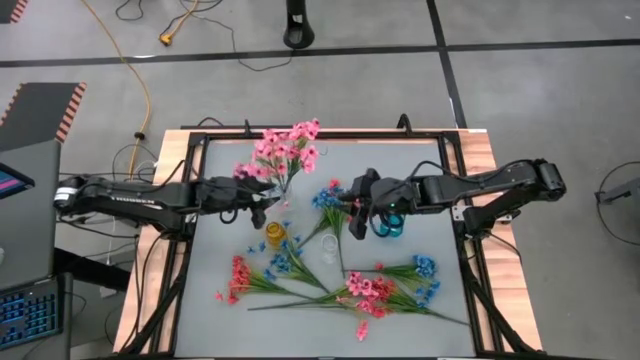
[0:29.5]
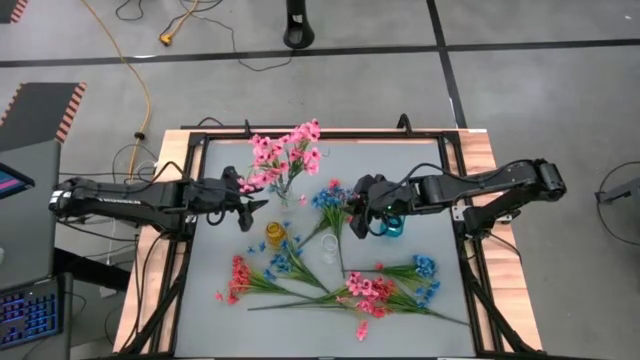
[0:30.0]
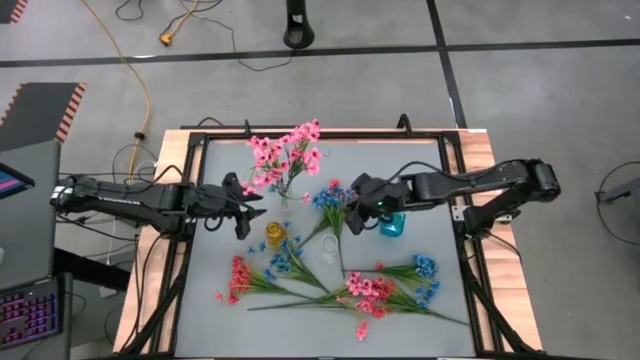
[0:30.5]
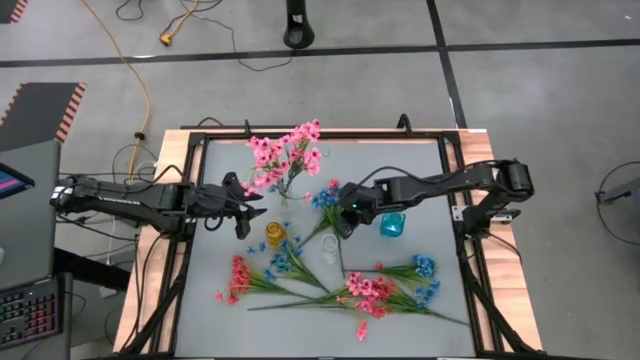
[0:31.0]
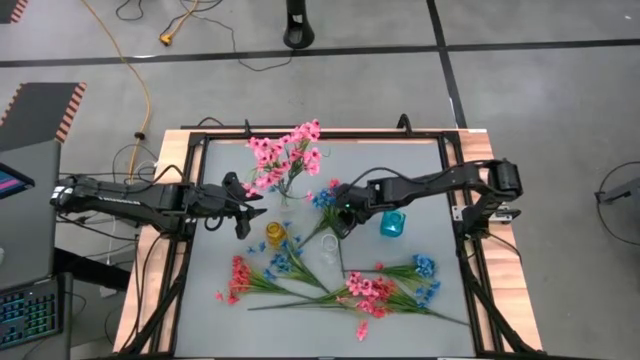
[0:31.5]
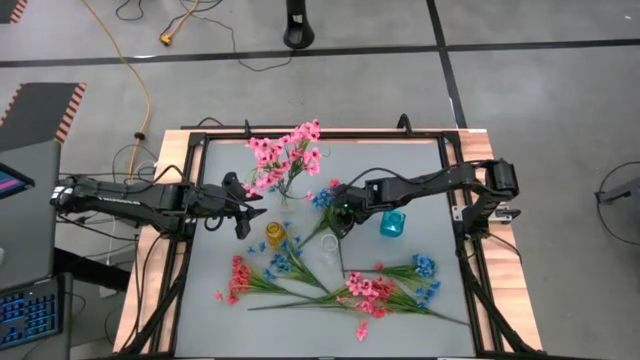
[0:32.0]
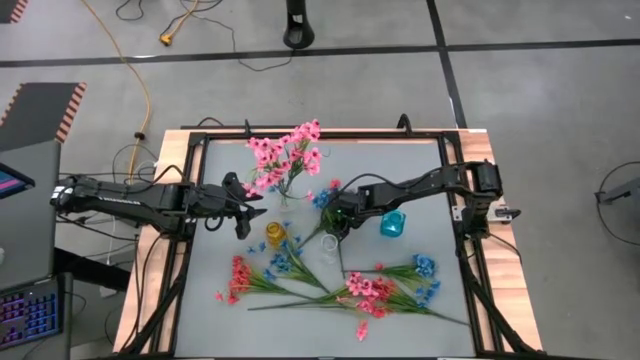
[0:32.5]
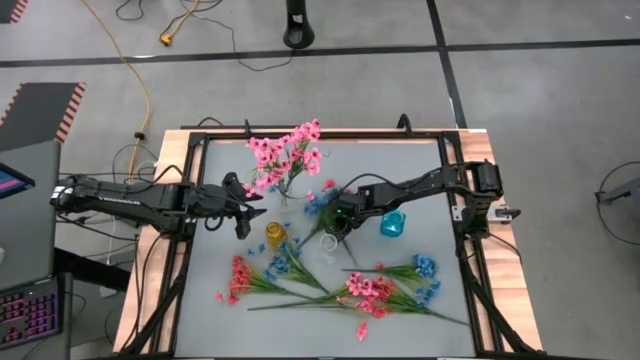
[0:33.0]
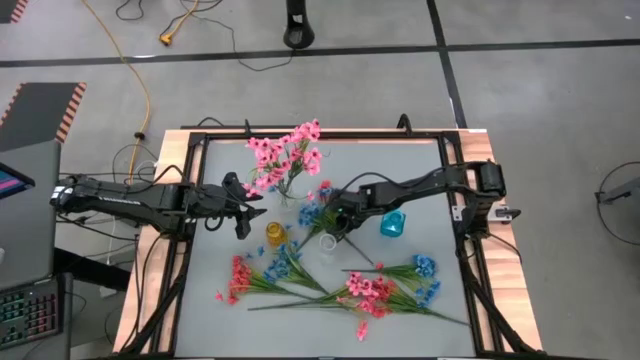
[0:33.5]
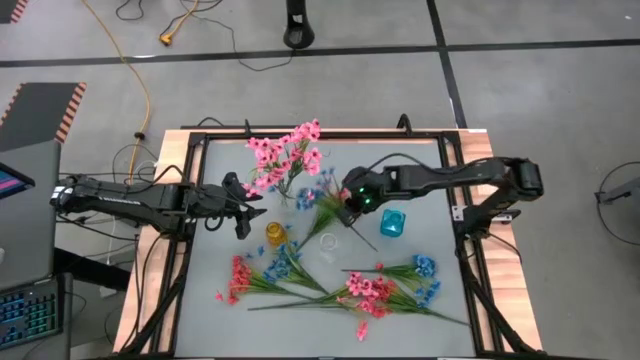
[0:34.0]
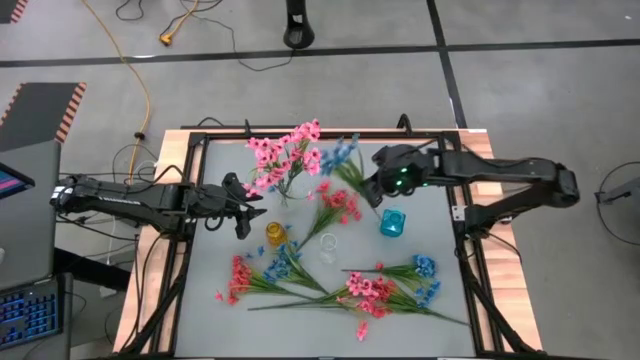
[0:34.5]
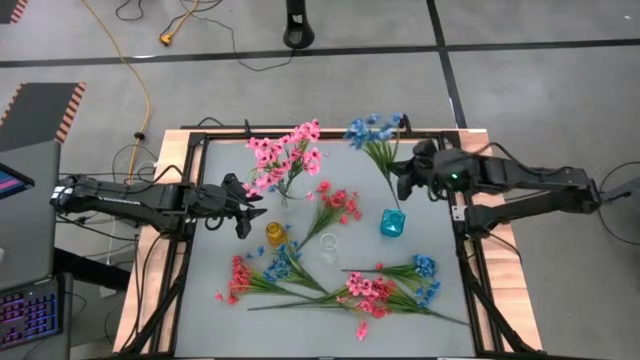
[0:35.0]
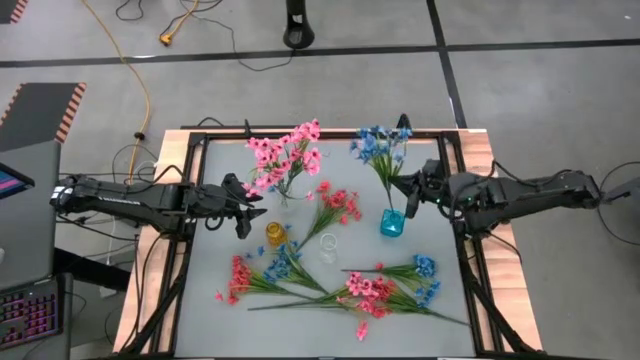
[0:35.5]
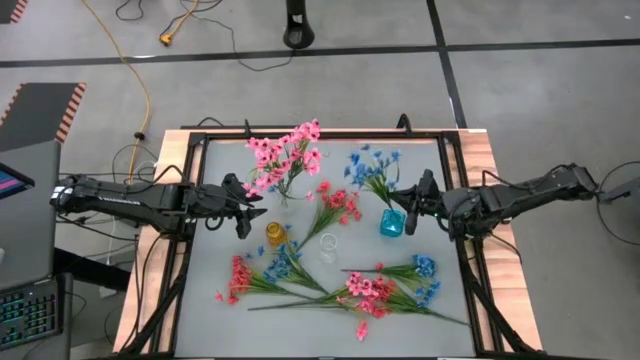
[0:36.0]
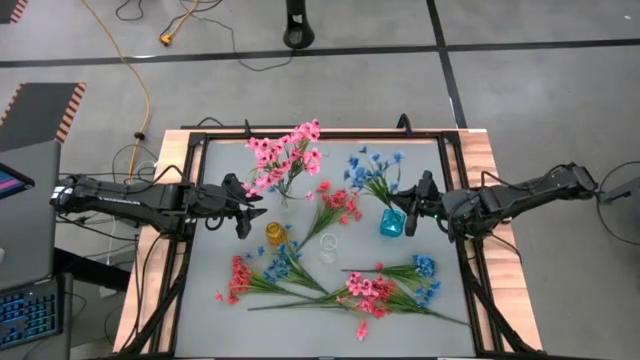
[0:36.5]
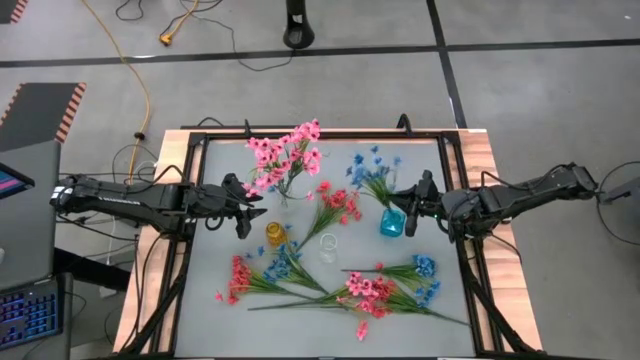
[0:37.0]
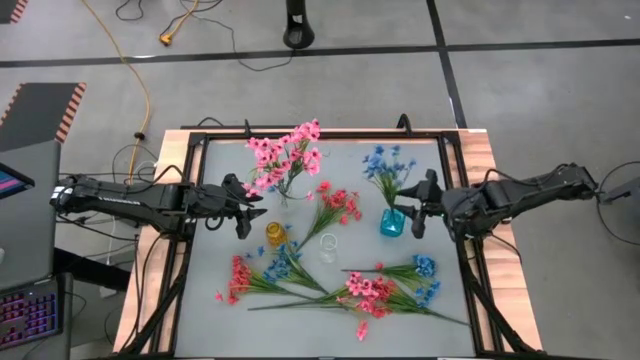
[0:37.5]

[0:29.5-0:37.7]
Task: Sort flowers into vase by color
Put the top blue flowers into the blue vase

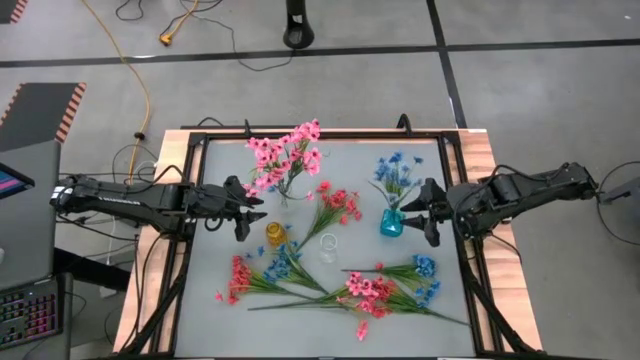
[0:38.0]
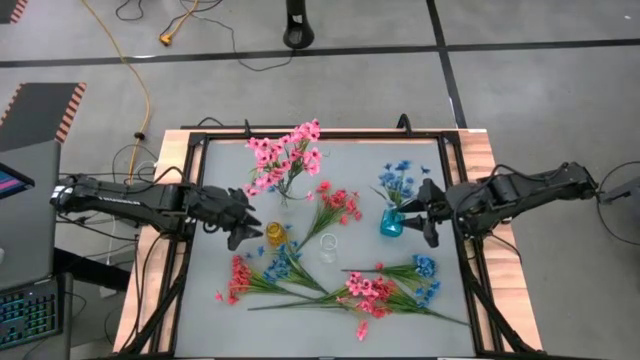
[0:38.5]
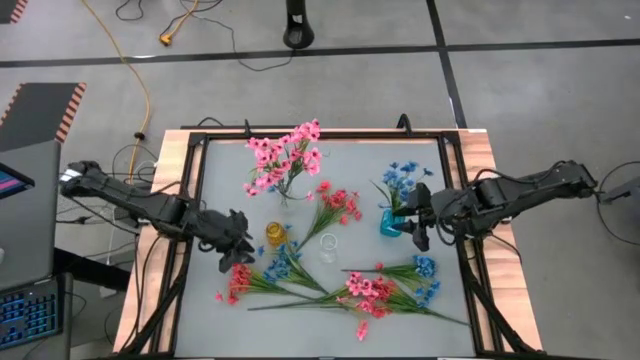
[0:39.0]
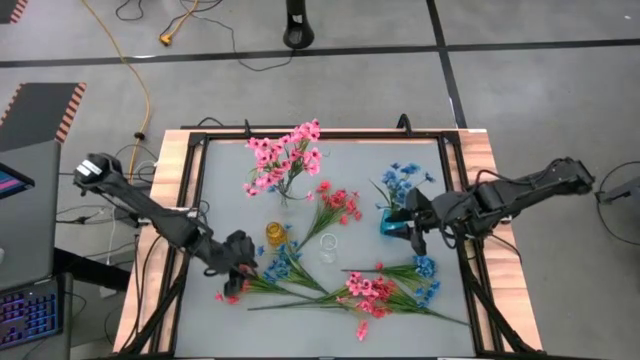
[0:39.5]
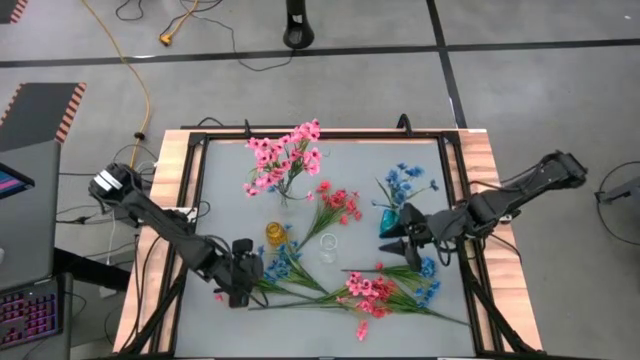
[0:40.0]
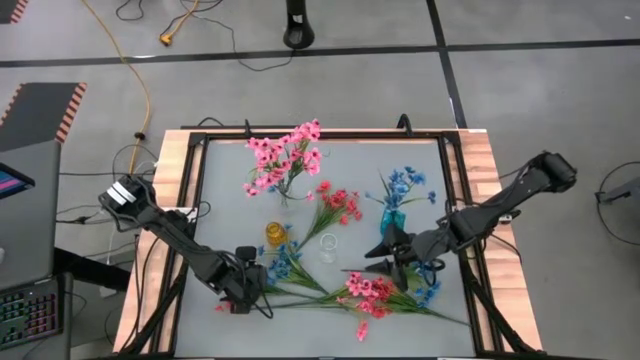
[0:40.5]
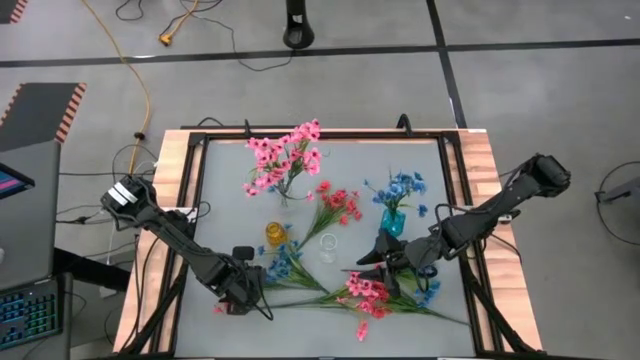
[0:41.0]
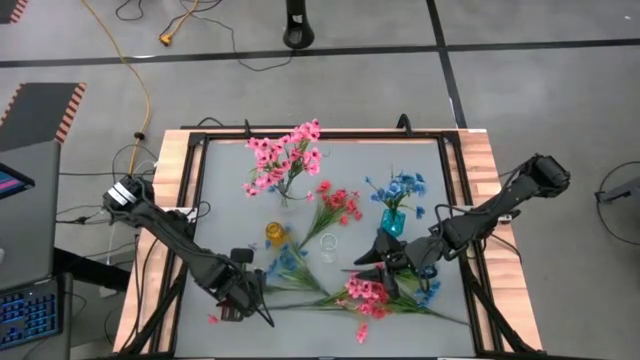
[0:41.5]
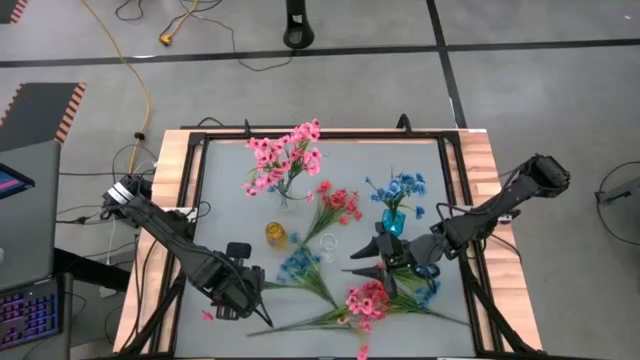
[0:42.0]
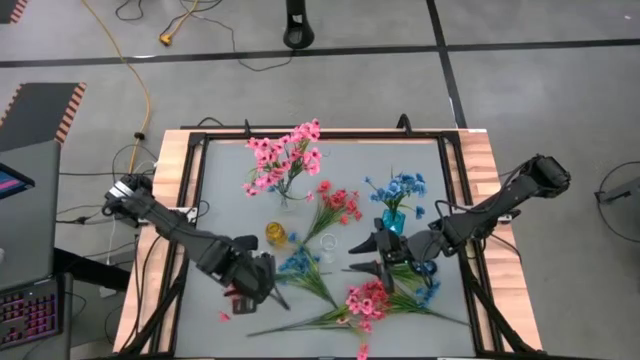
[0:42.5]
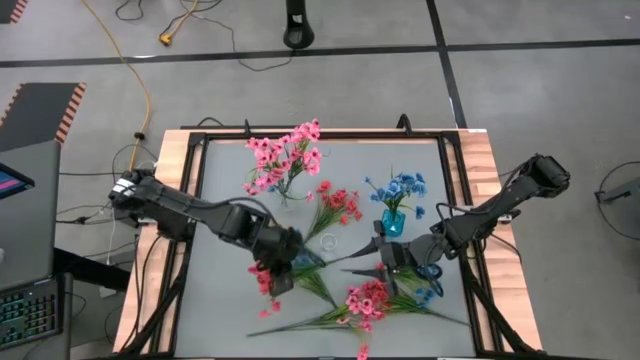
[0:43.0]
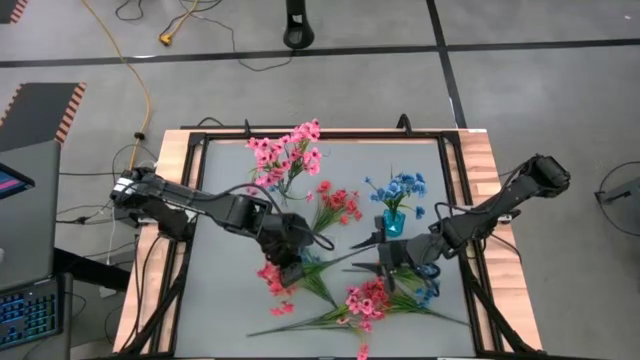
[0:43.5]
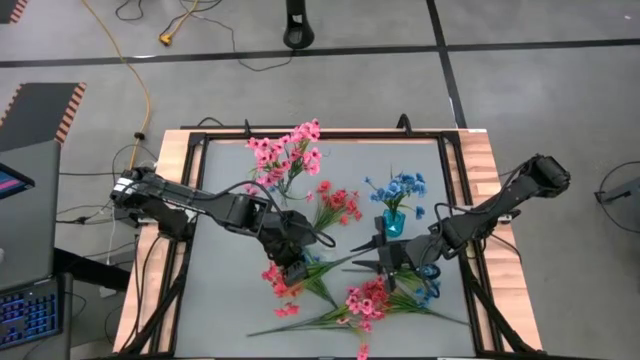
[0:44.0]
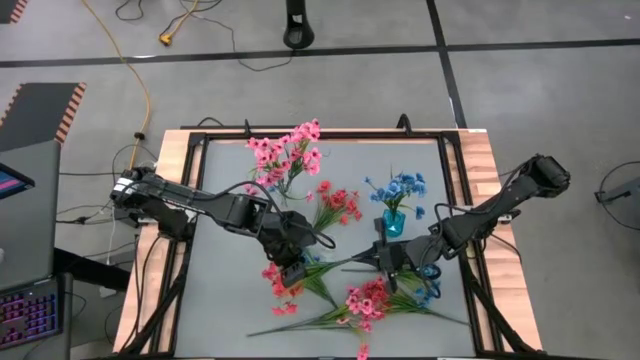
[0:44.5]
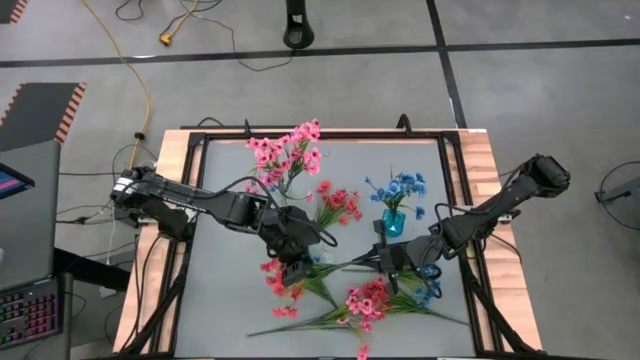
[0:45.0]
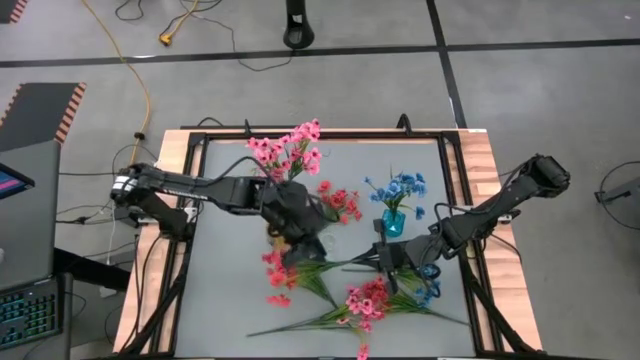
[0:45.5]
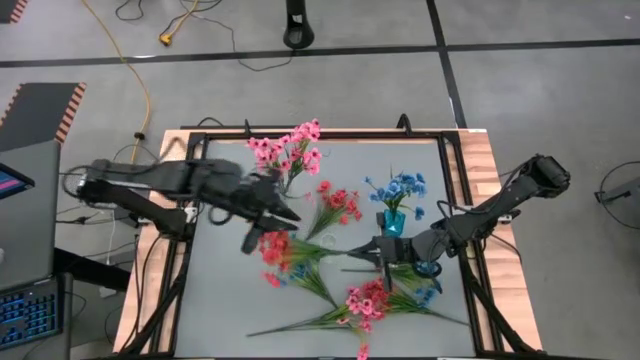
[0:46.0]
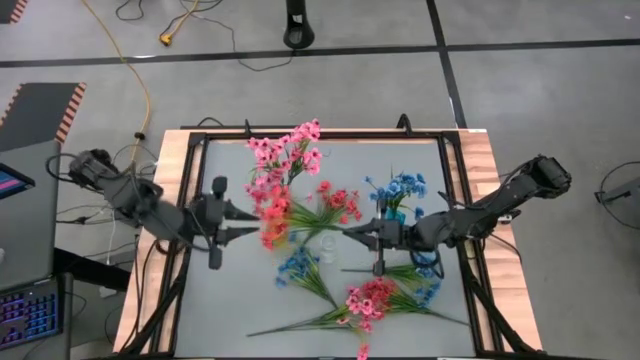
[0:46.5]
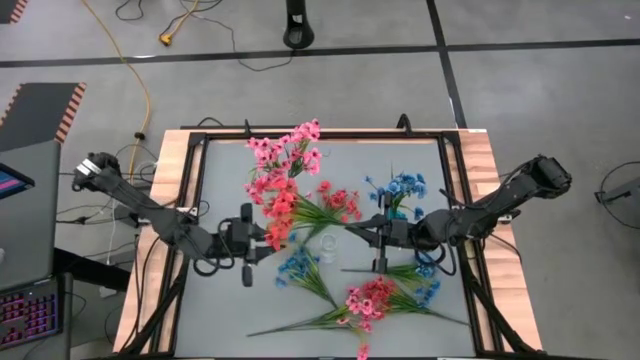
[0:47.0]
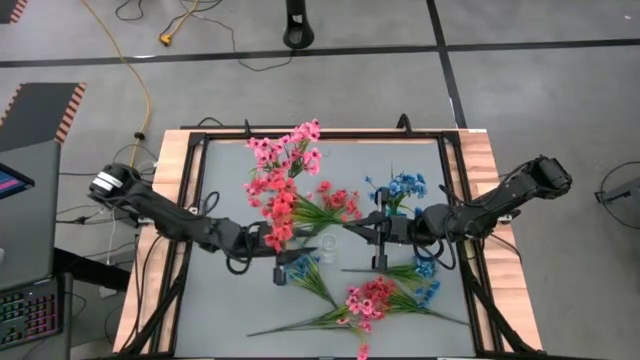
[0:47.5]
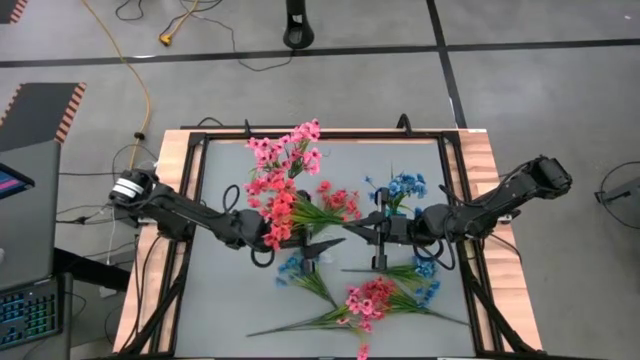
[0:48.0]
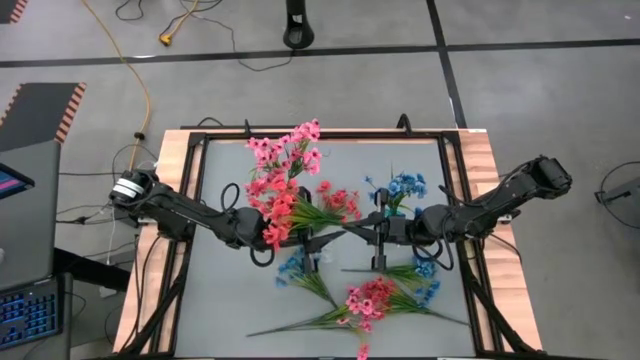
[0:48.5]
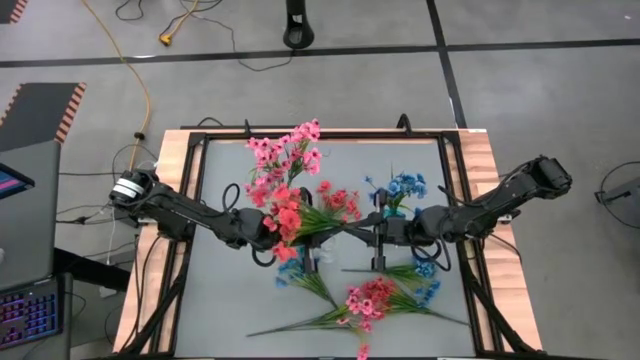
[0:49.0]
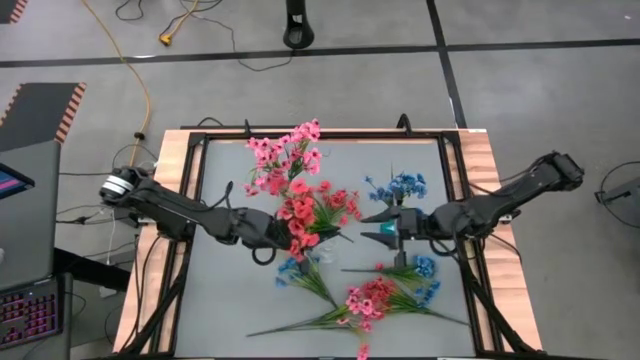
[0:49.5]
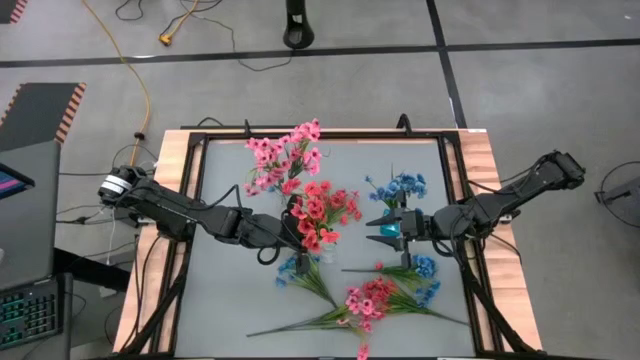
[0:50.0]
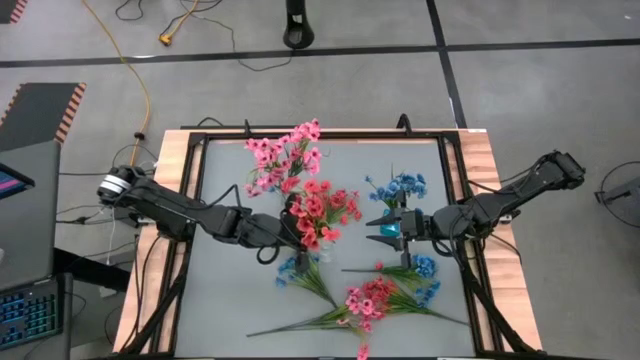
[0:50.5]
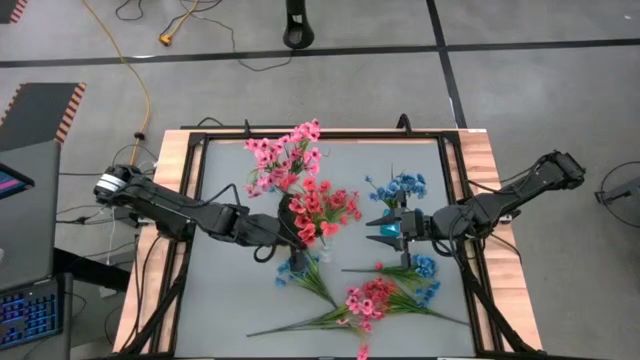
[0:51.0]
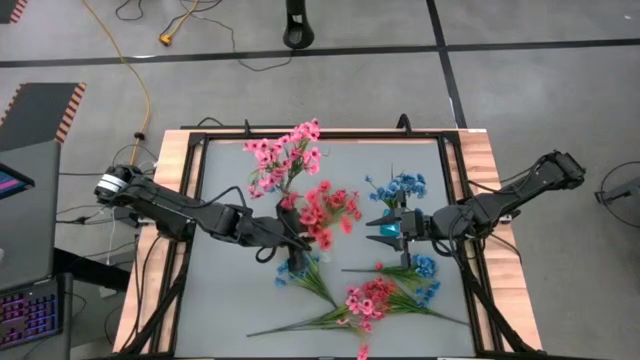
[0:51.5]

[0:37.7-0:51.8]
Put the bottom left red flowers into the bottom transparent vase
